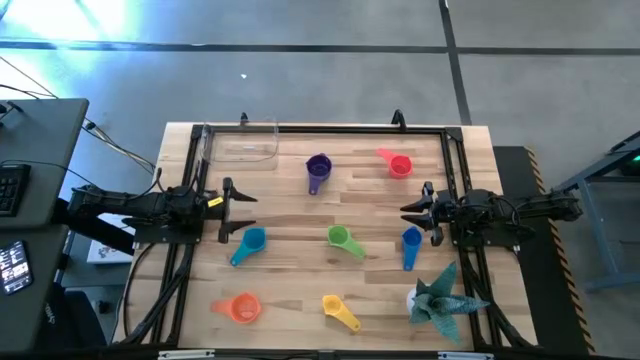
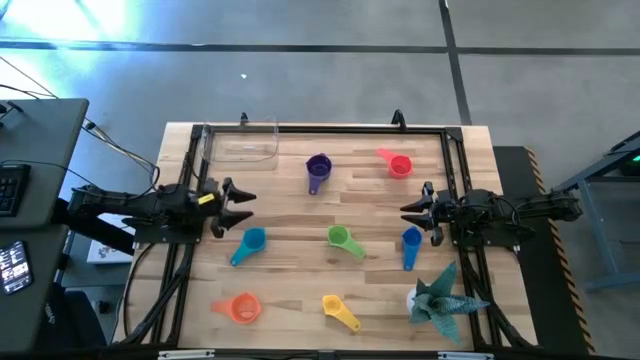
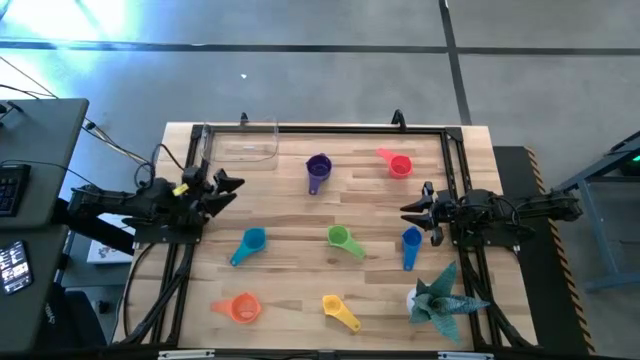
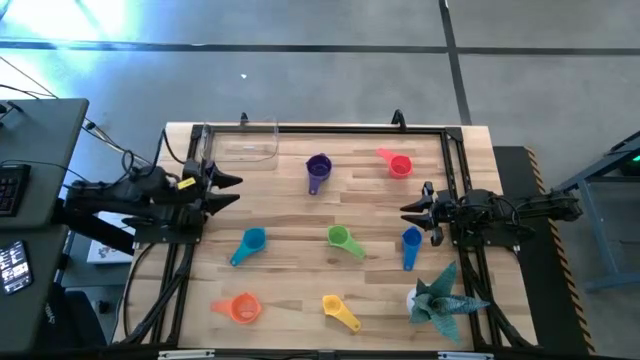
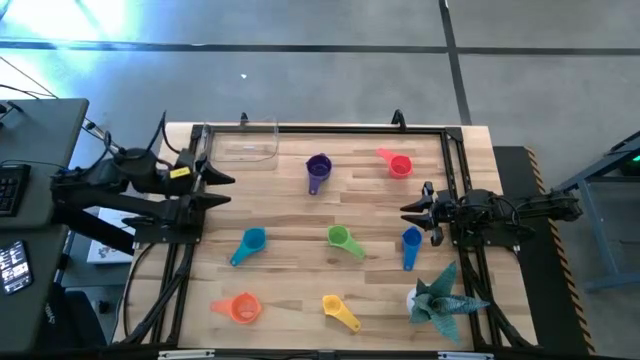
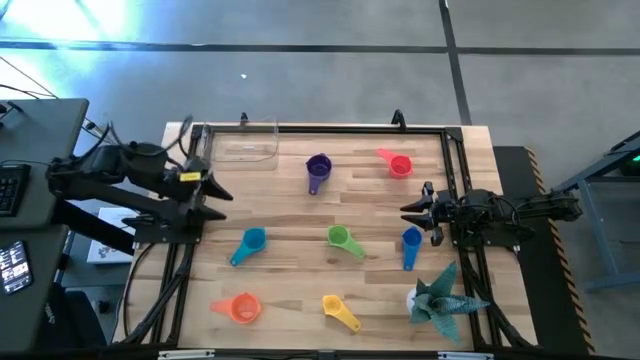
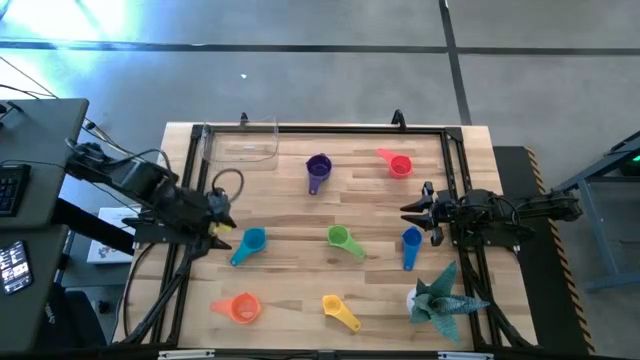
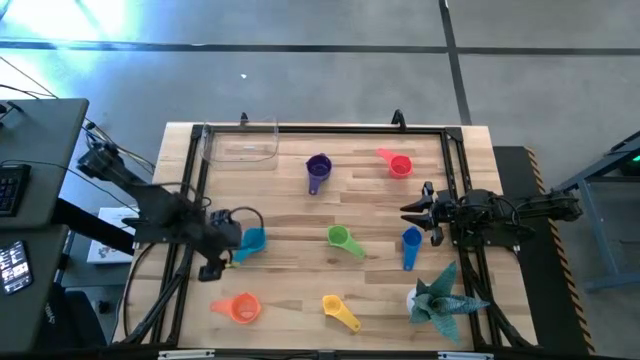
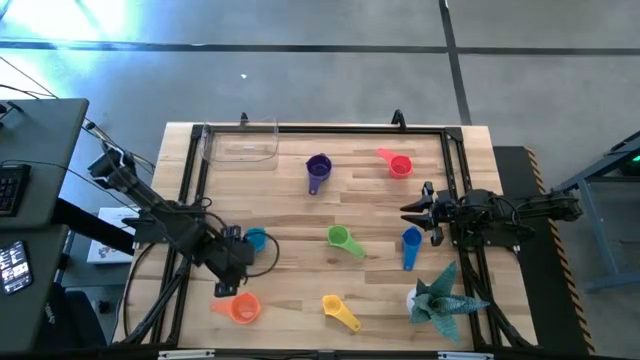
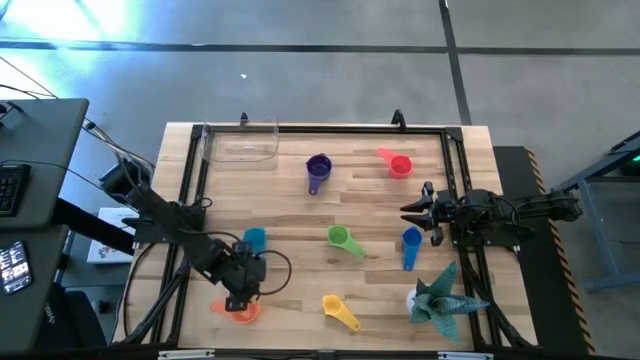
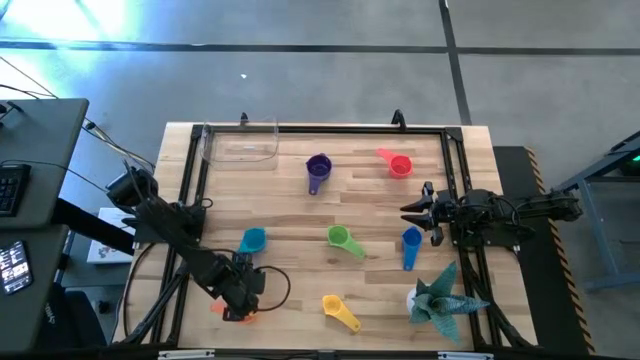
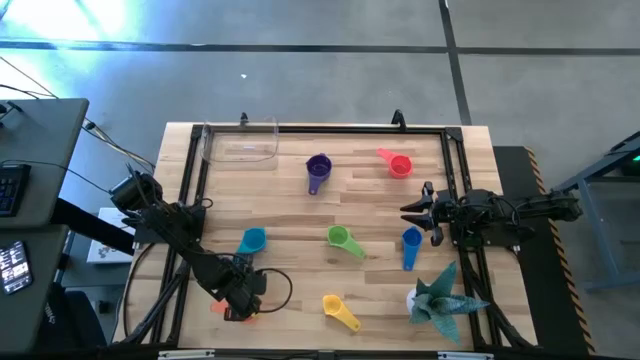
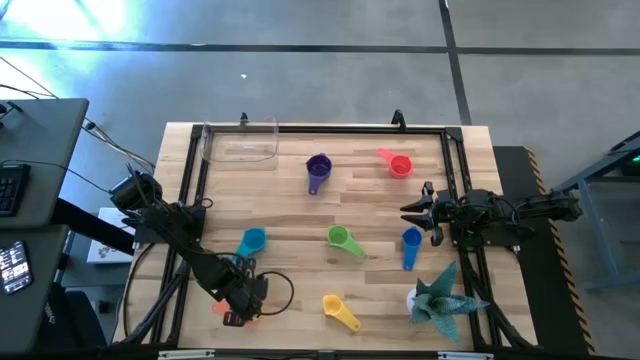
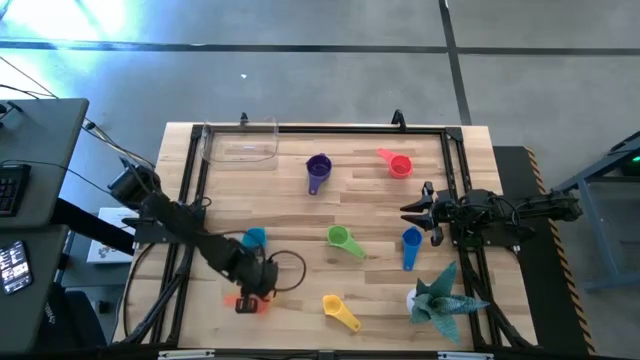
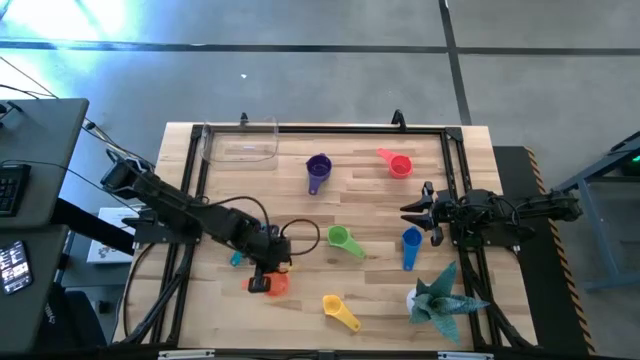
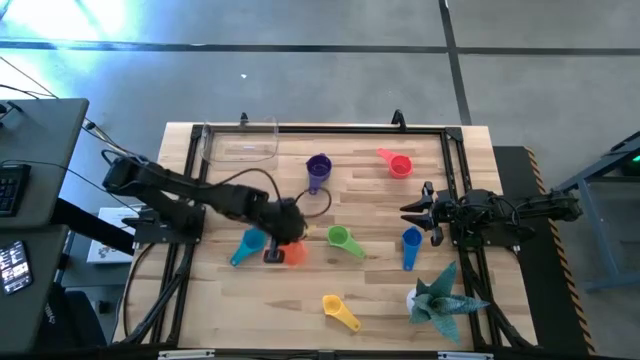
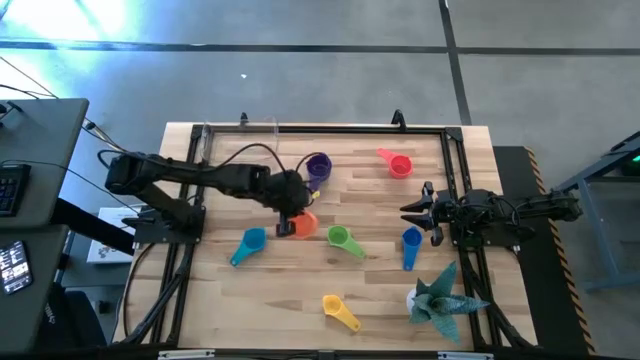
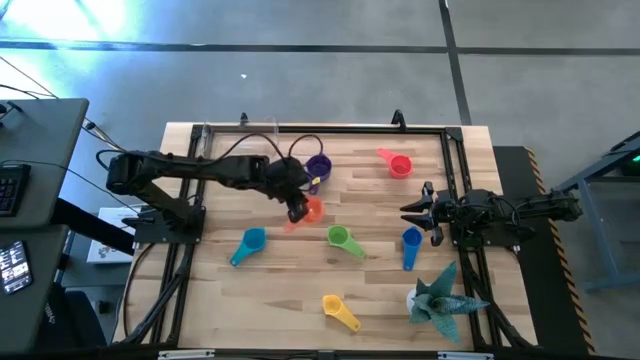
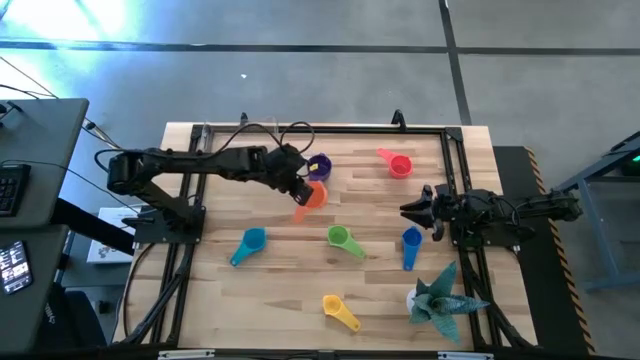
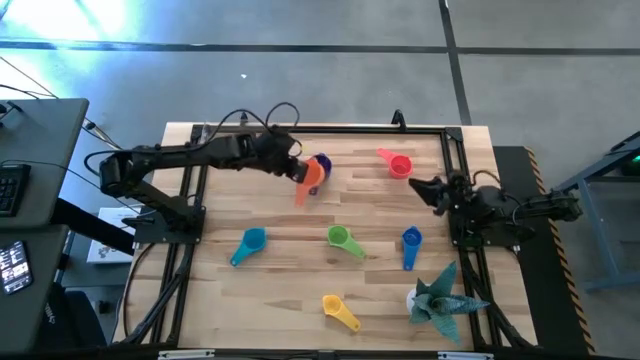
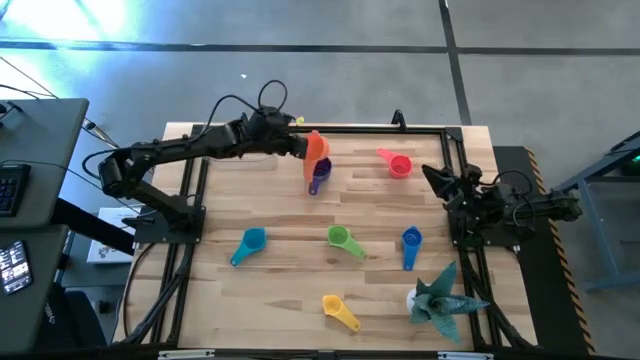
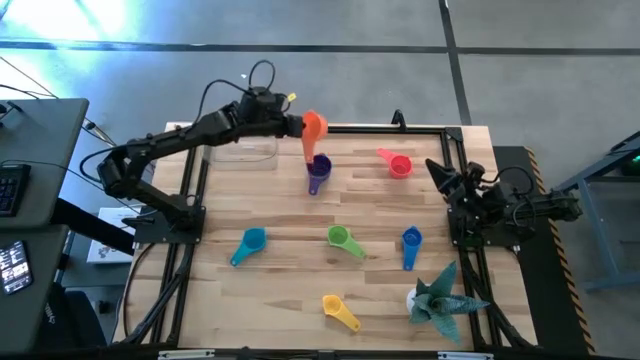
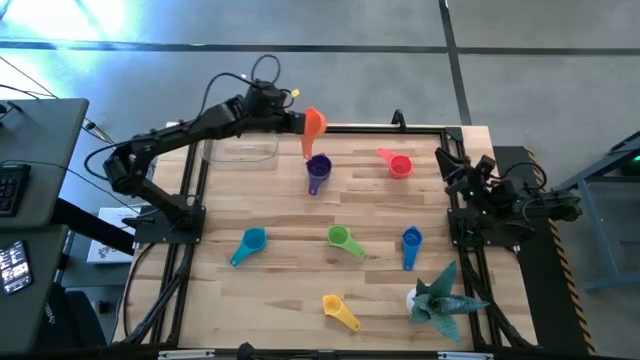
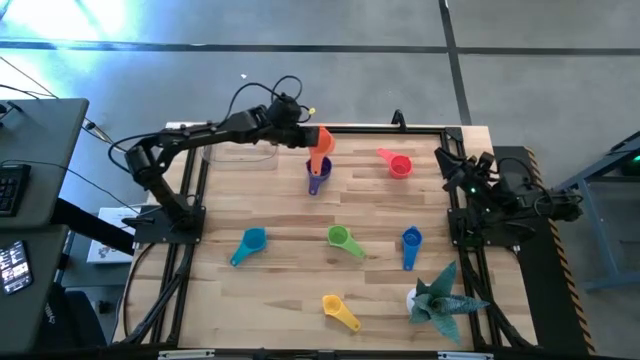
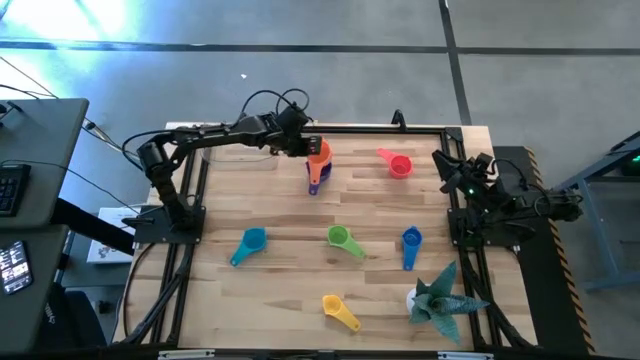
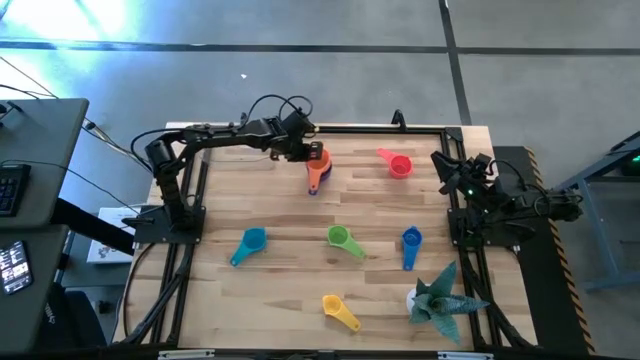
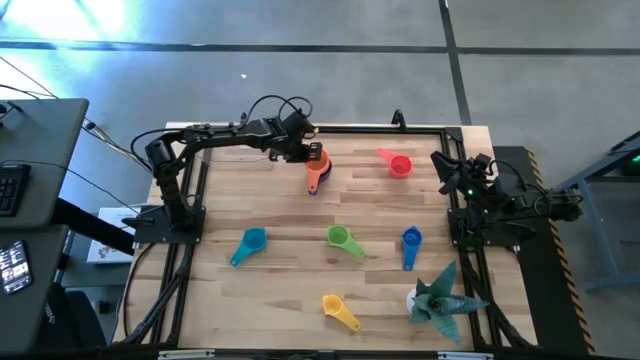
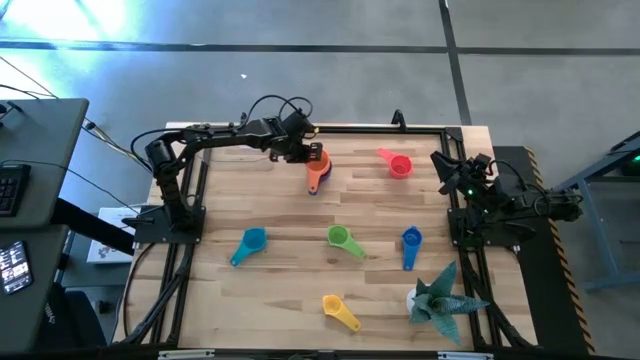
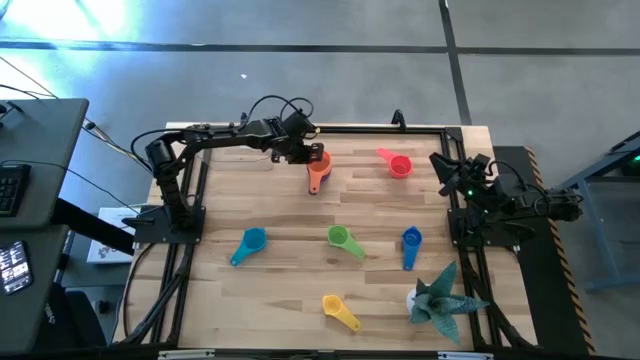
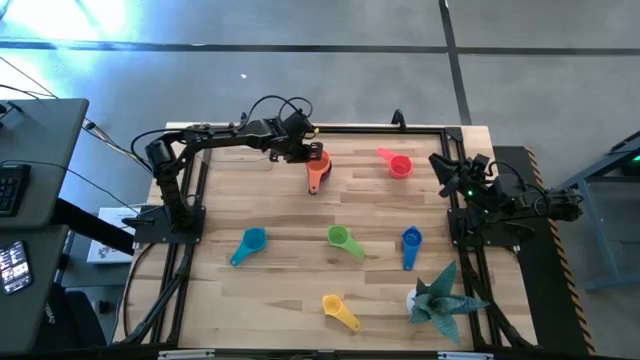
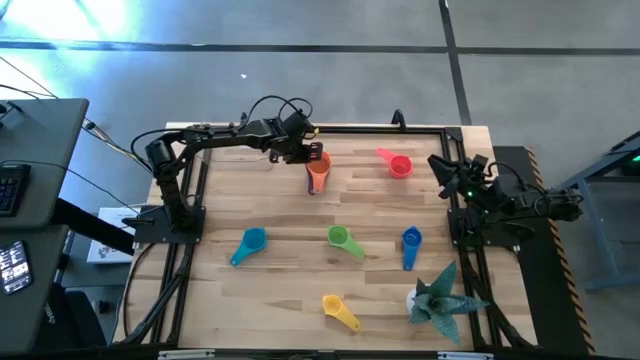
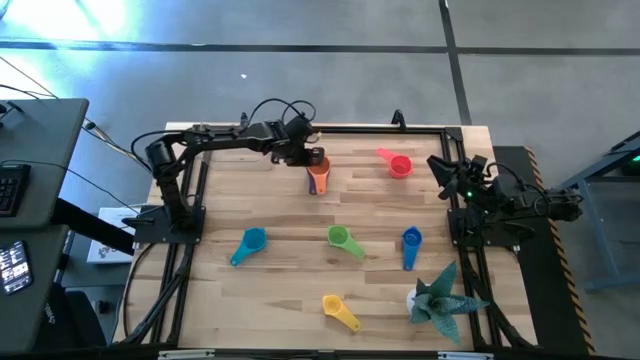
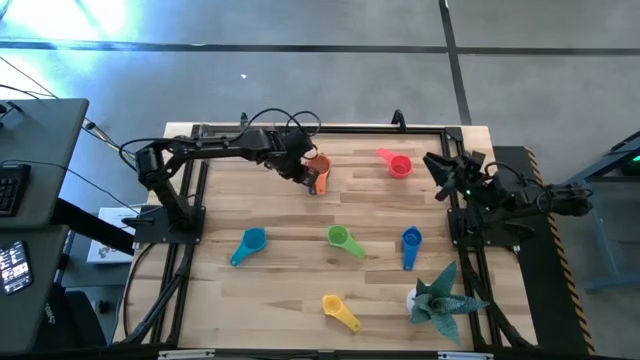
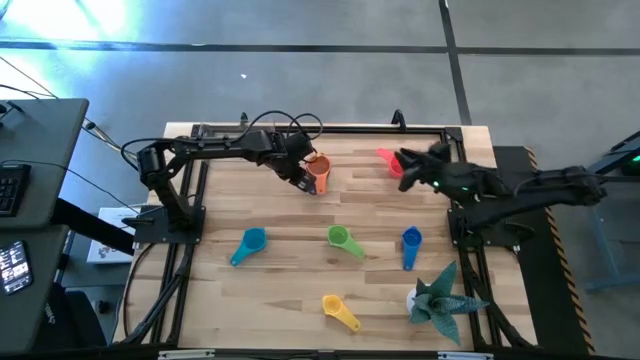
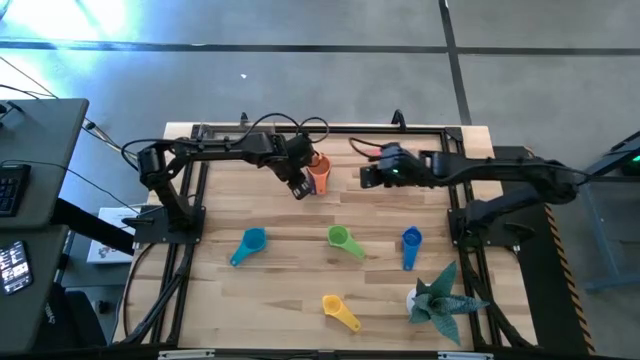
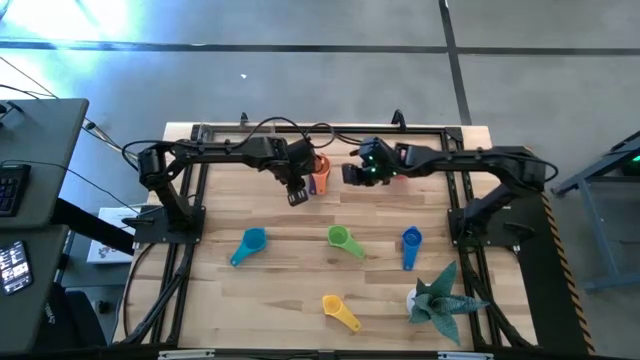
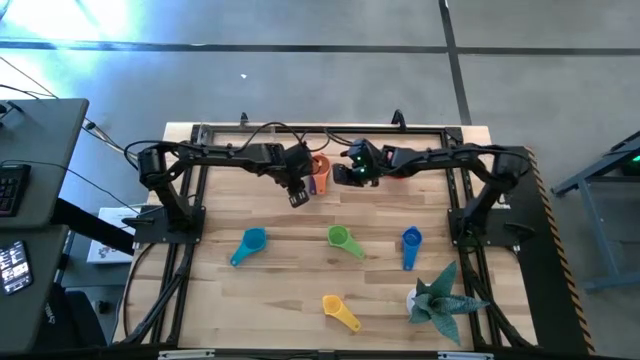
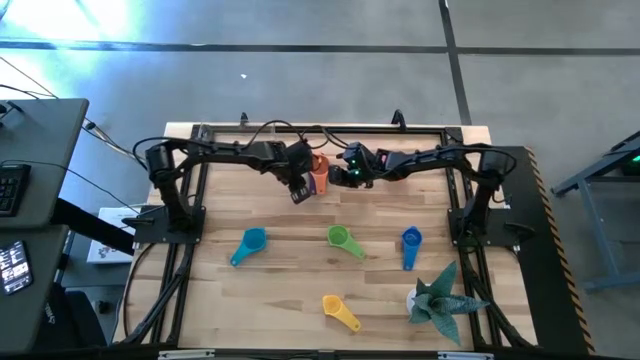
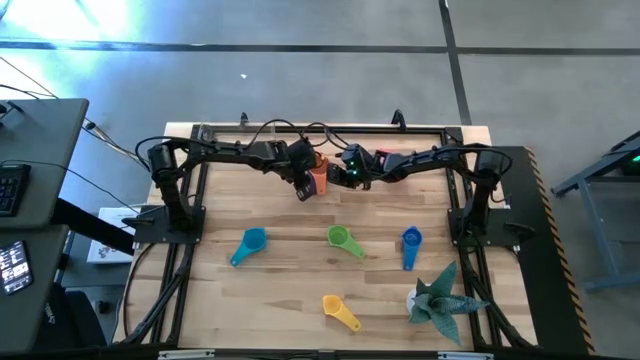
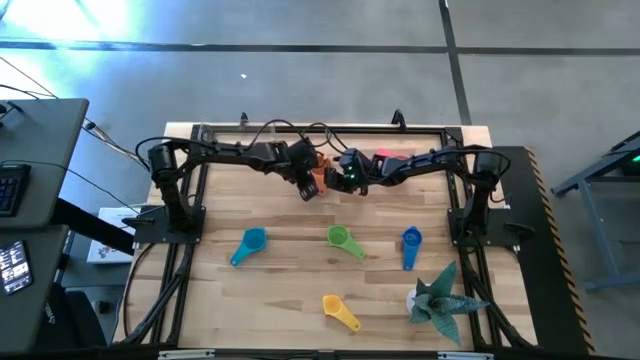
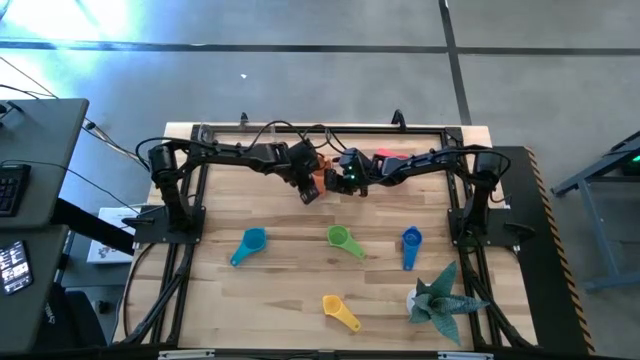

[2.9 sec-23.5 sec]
Task: Nest measuring cups in basket
Stack the orange measuring cup on top of the purple measuring cup on the table
